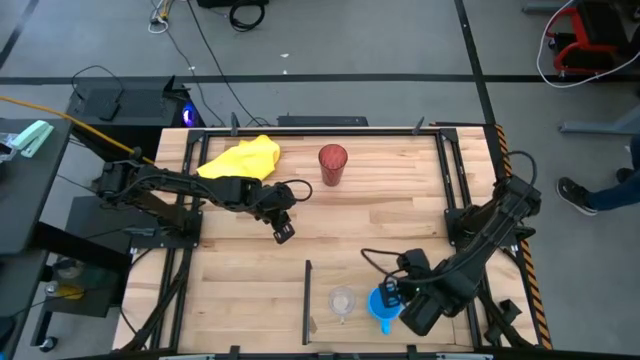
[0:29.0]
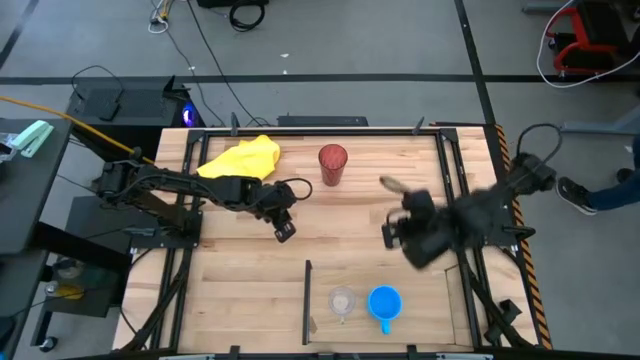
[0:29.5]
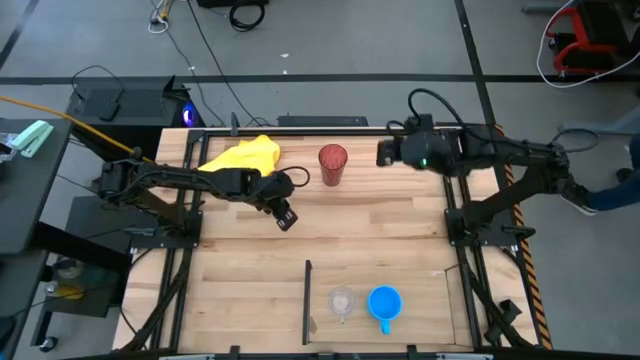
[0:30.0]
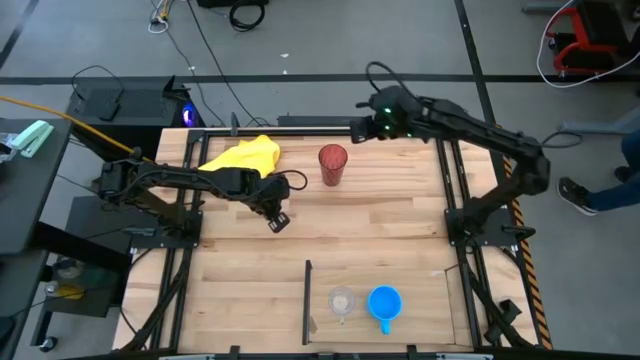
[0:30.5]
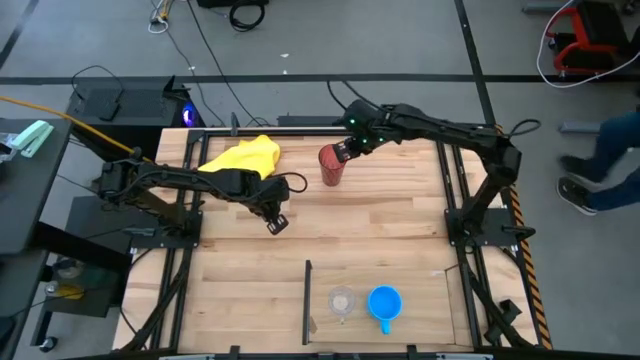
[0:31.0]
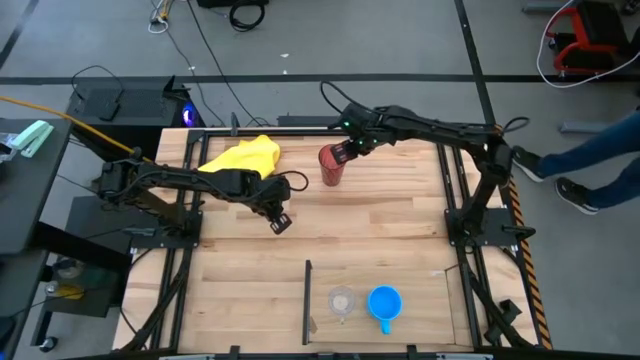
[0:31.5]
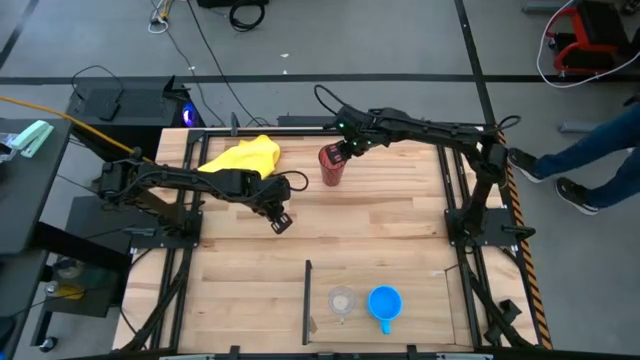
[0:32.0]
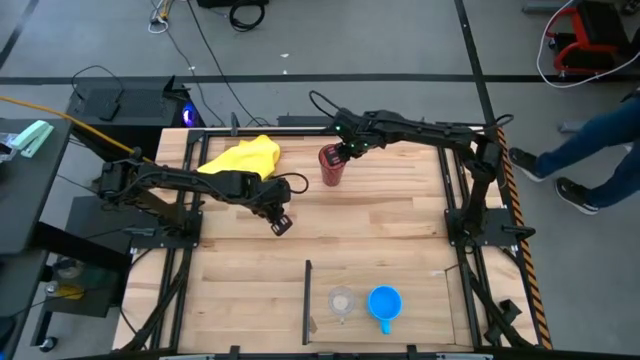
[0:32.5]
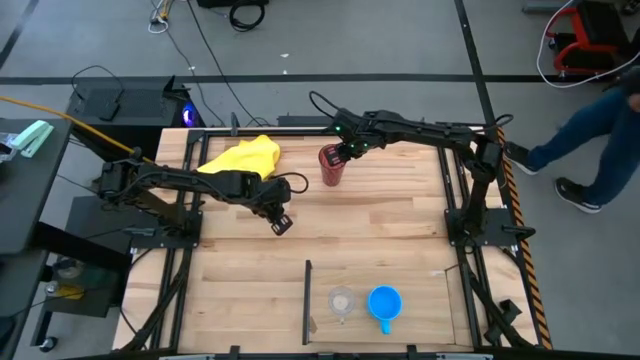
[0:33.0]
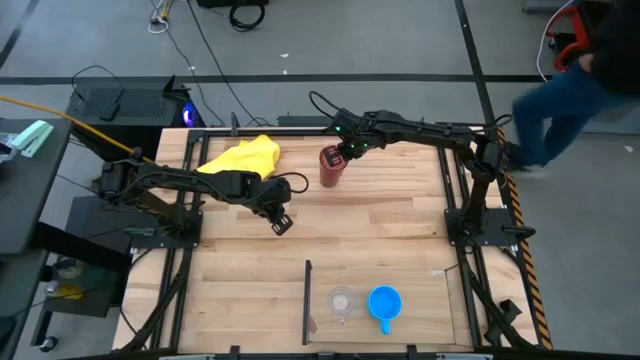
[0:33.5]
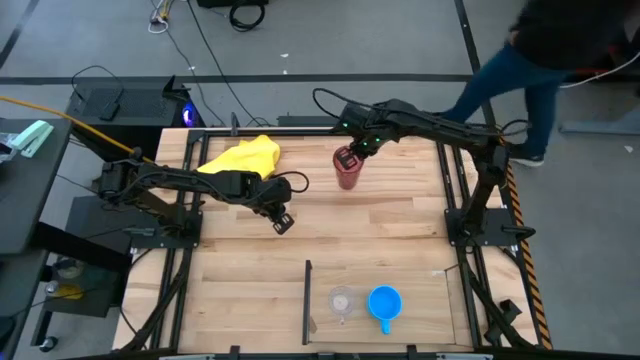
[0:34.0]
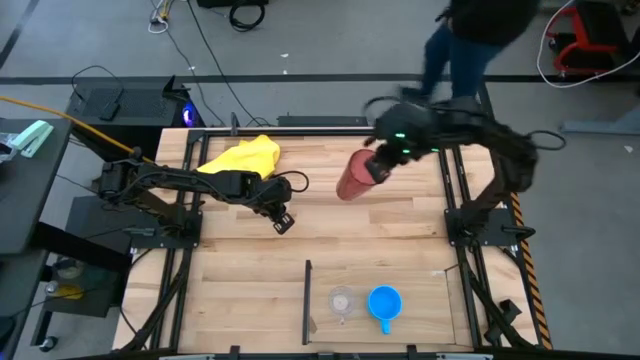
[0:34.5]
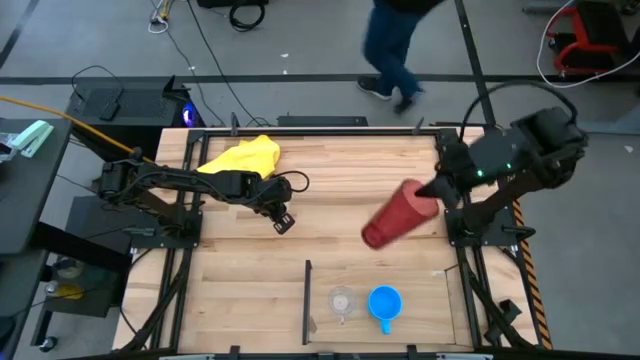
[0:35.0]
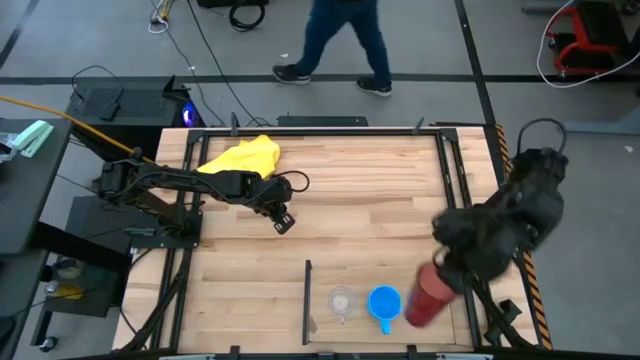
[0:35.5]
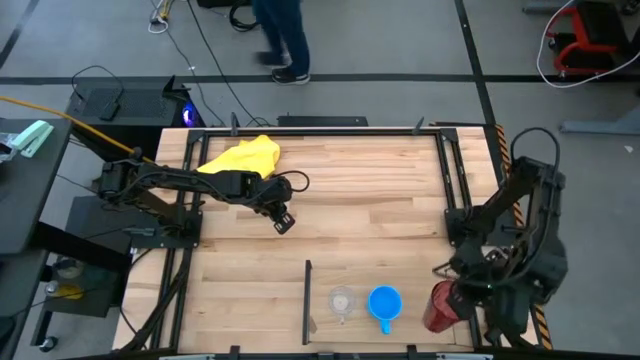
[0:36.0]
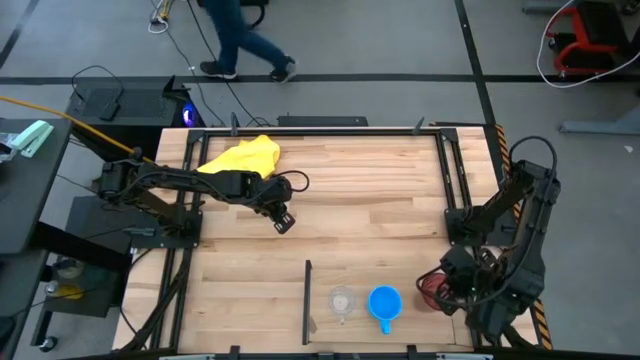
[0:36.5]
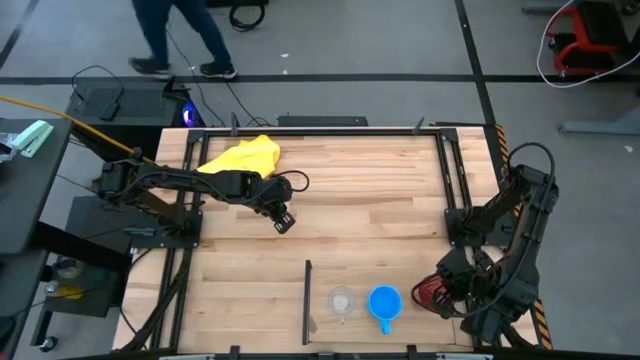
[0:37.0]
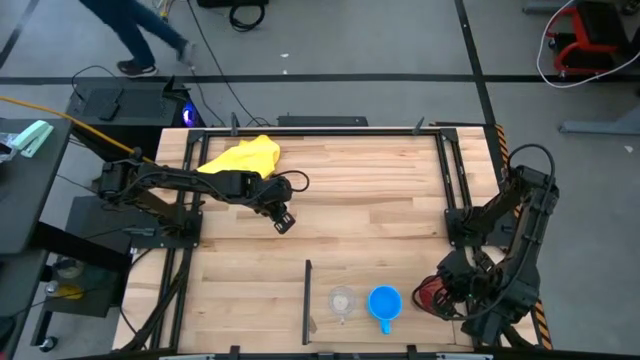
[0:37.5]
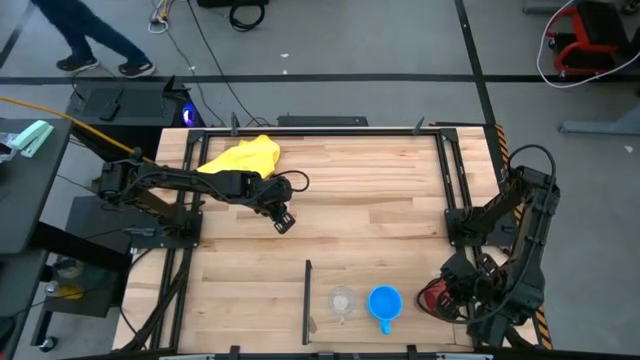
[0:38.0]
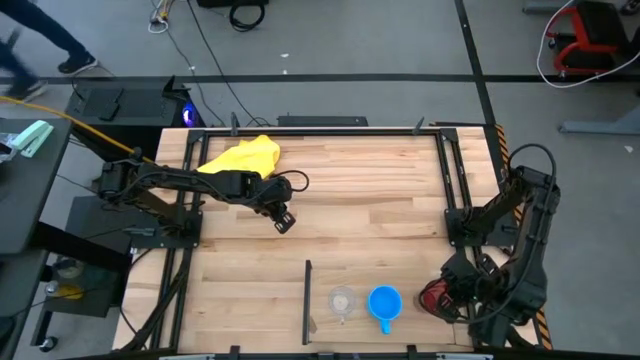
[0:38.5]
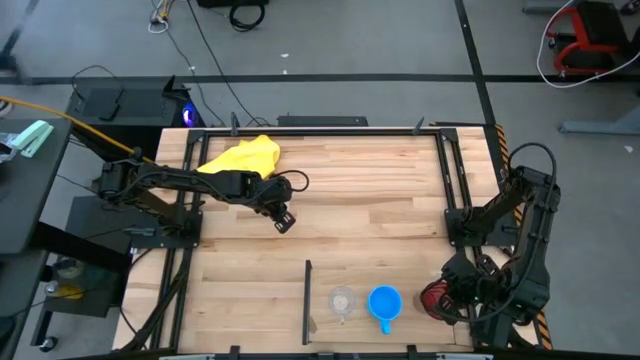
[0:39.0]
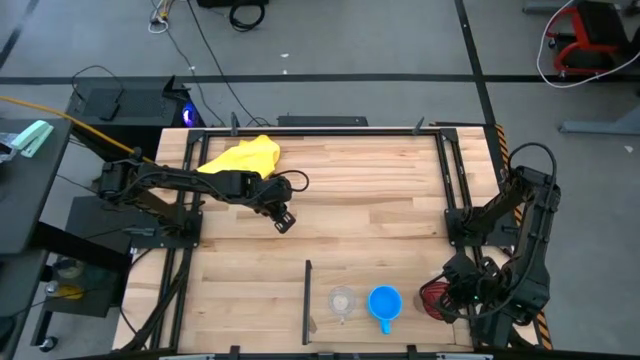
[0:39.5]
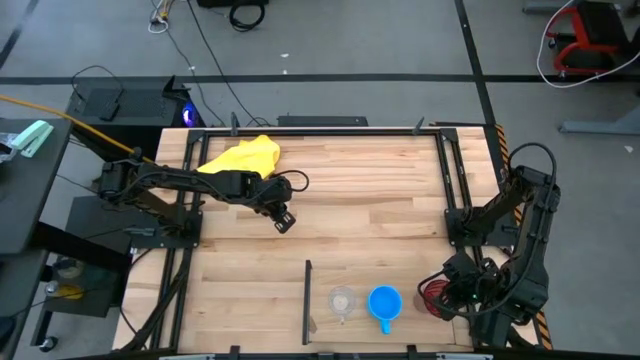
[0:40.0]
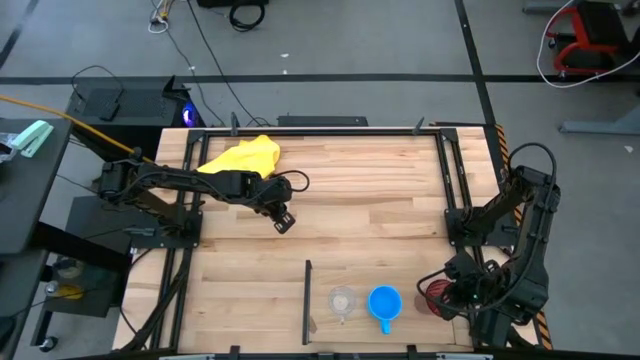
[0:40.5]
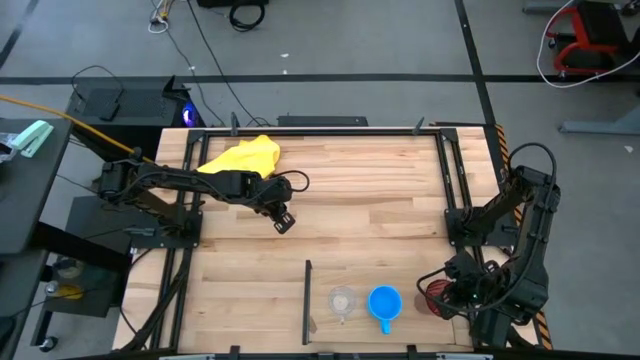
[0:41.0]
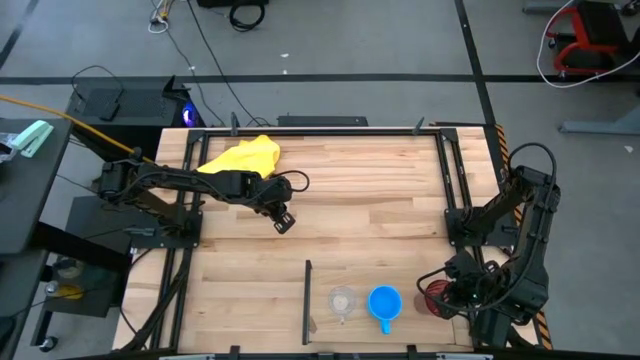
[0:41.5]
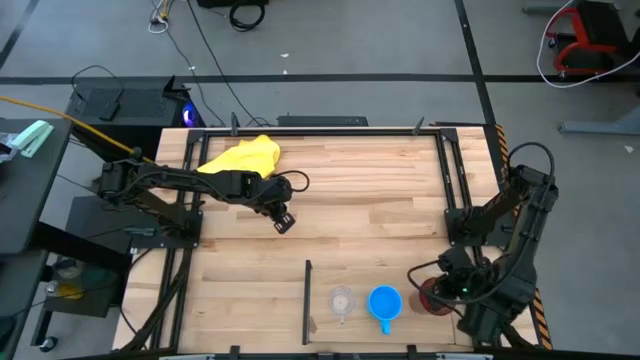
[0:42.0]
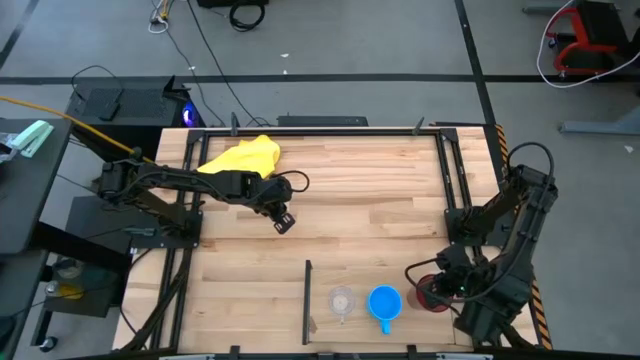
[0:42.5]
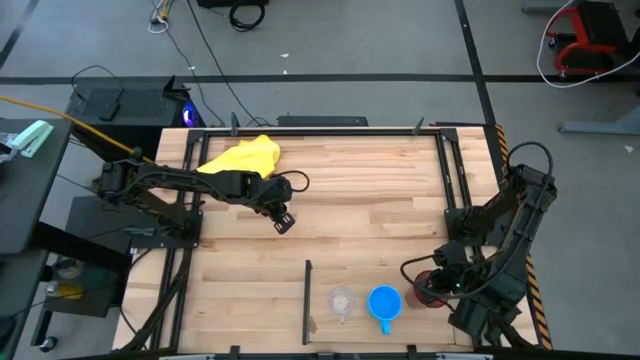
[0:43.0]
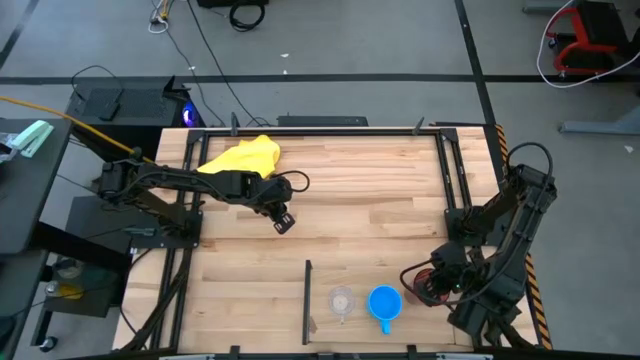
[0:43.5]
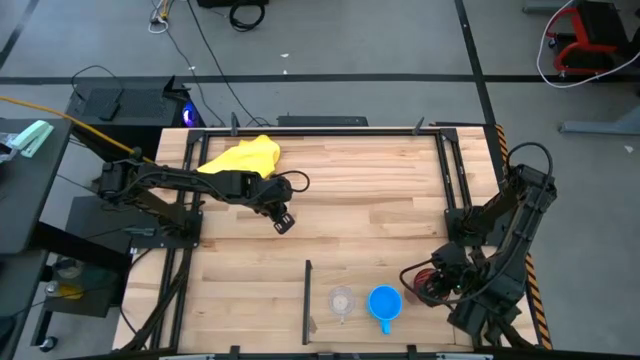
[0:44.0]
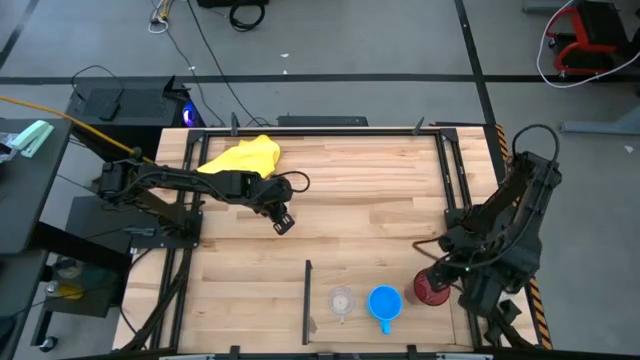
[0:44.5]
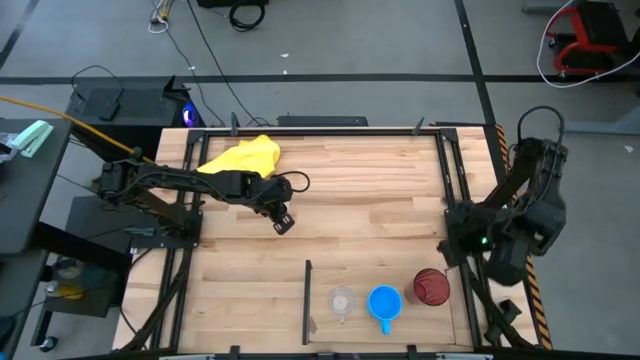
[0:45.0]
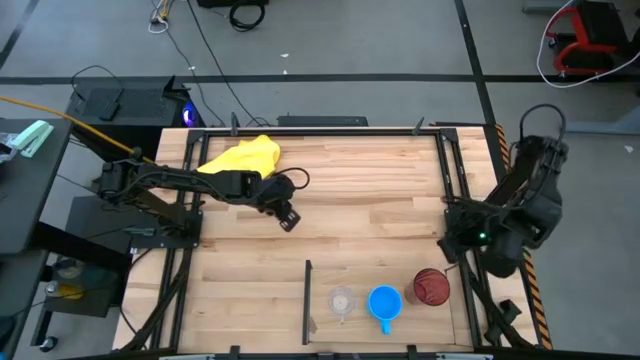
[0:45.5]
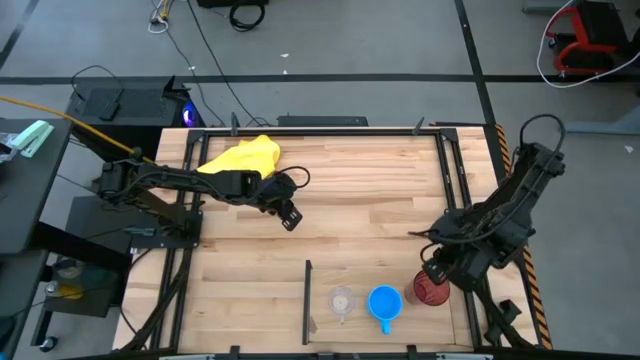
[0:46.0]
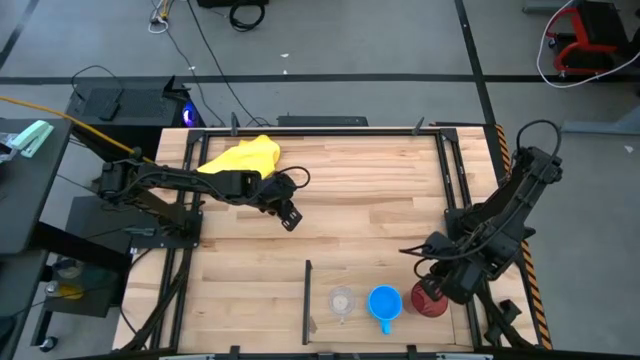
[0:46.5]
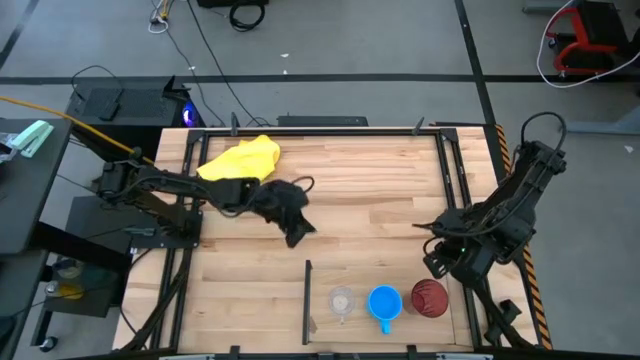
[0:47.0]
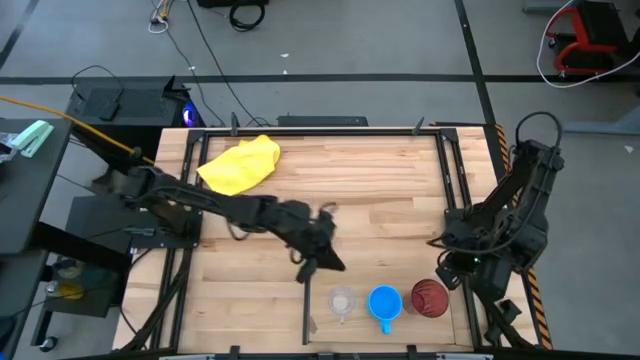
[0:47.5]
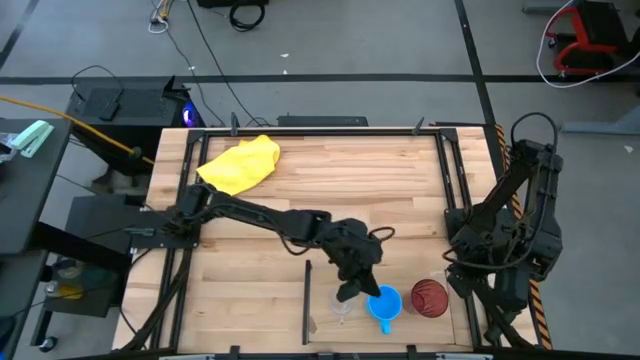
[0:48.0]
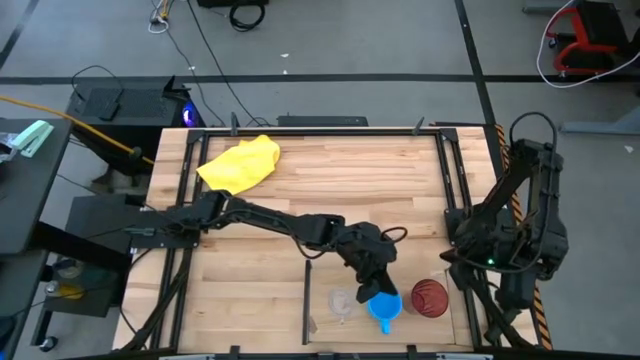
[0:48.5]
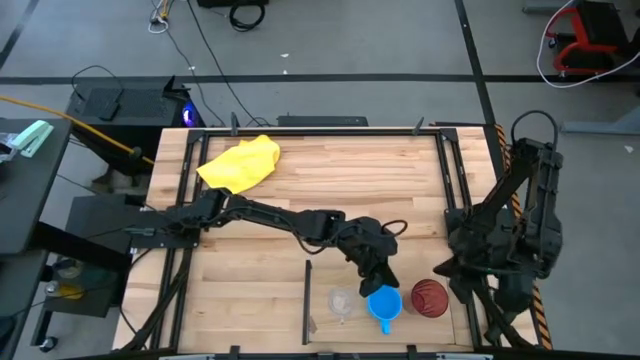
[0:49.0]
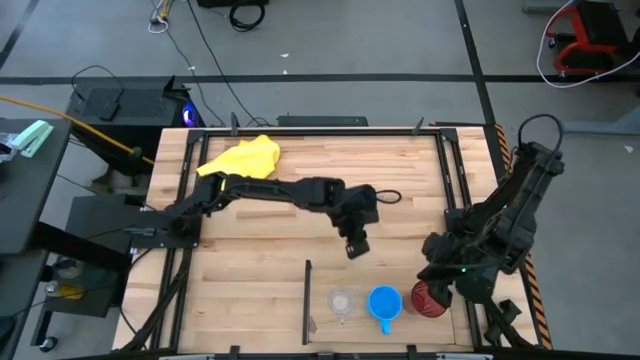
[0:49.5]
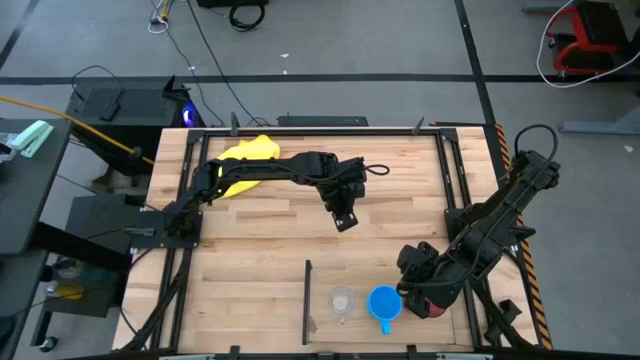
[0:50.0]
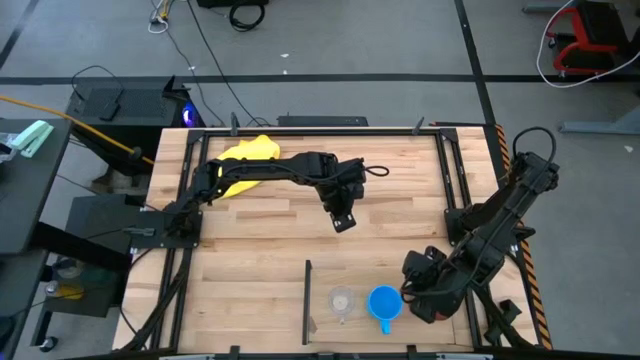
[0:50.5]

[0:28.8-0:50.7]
Task: Stack small to large cups/mugs on shelf
Put the red cup on the shelf
